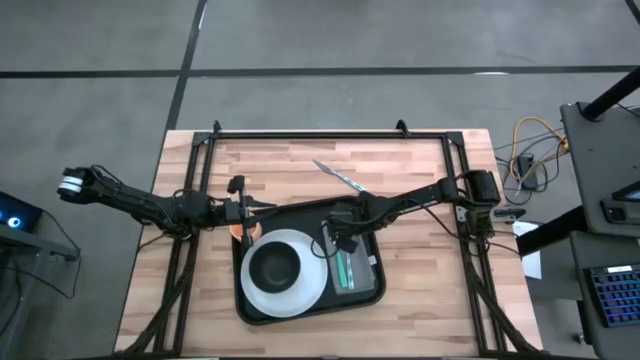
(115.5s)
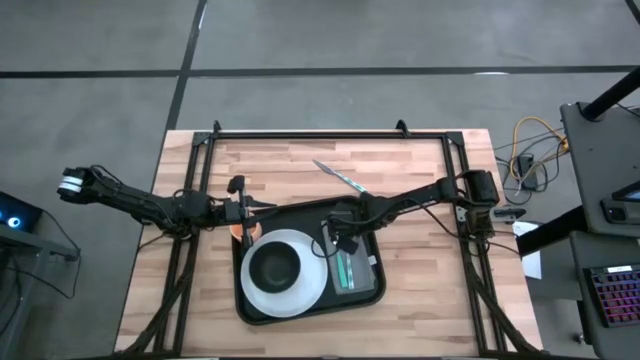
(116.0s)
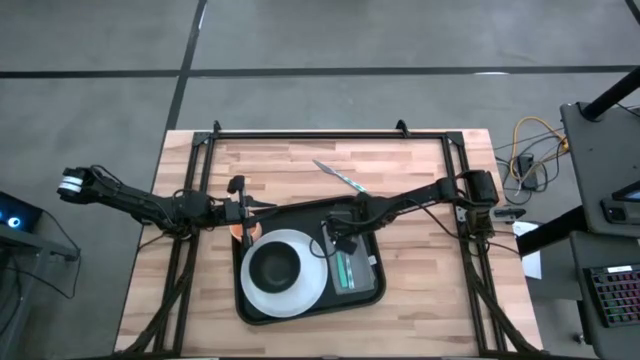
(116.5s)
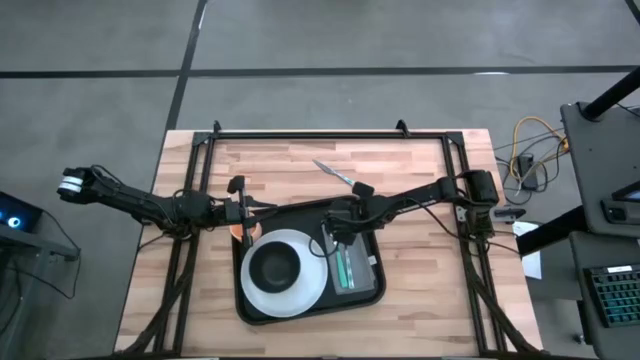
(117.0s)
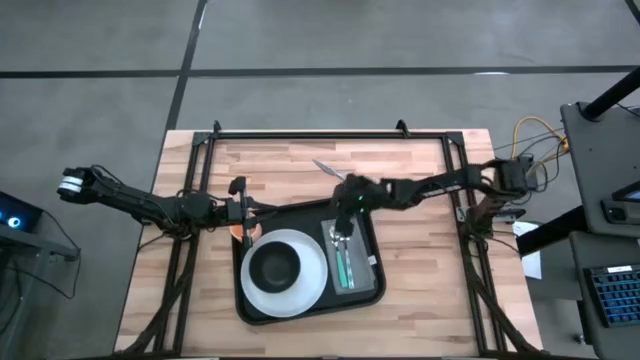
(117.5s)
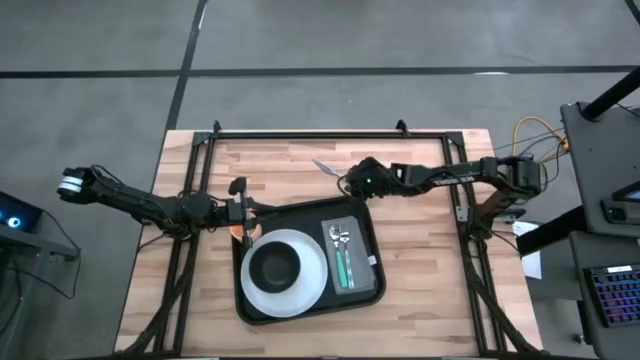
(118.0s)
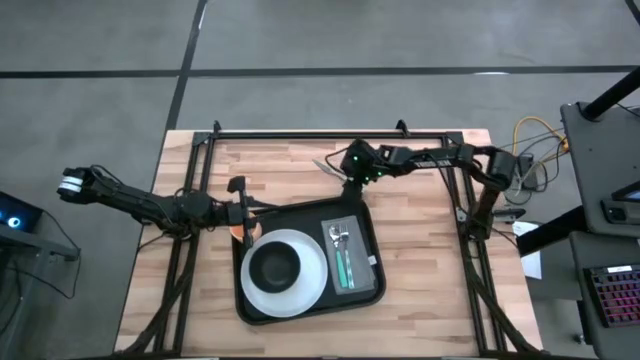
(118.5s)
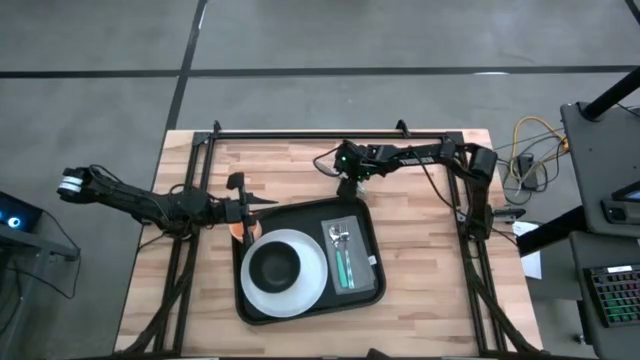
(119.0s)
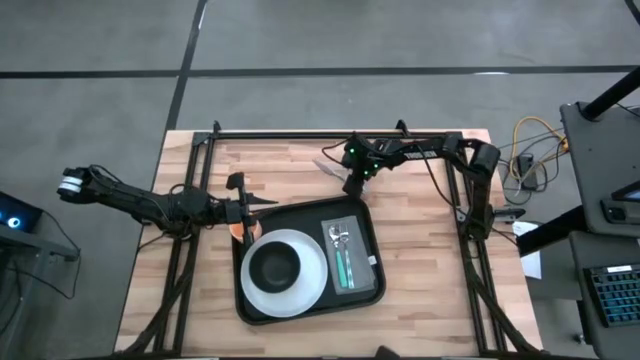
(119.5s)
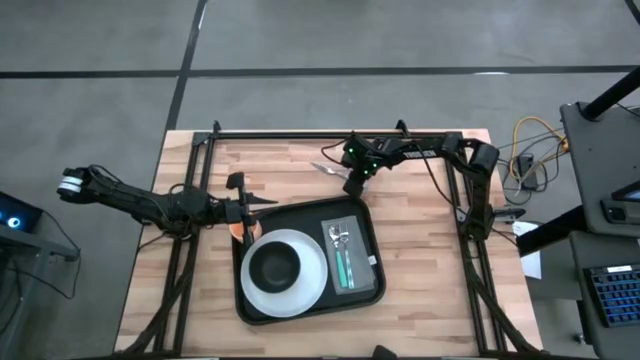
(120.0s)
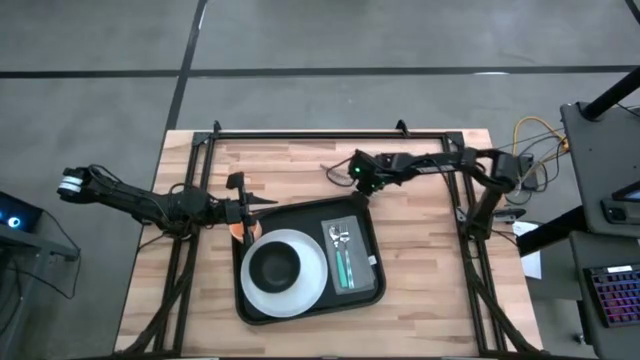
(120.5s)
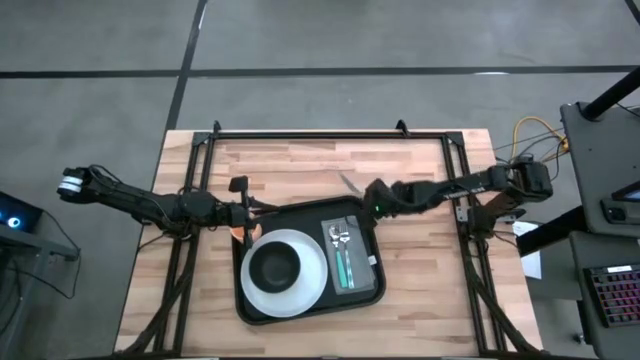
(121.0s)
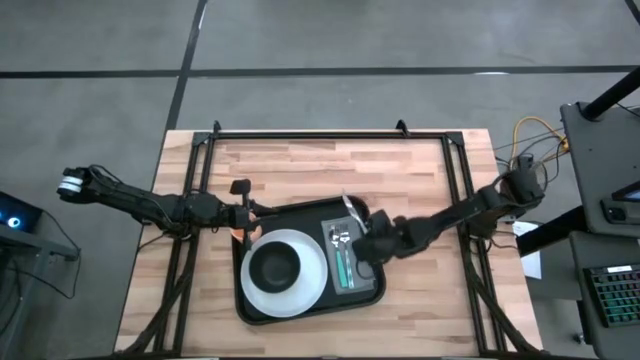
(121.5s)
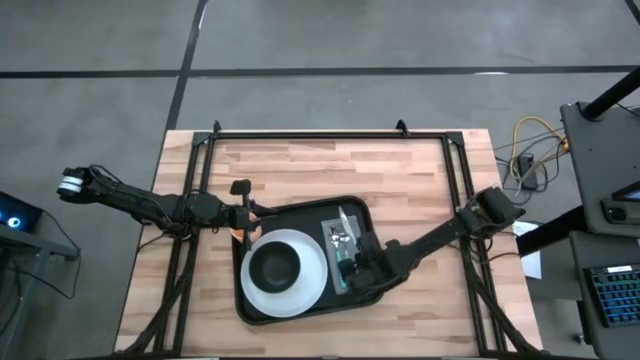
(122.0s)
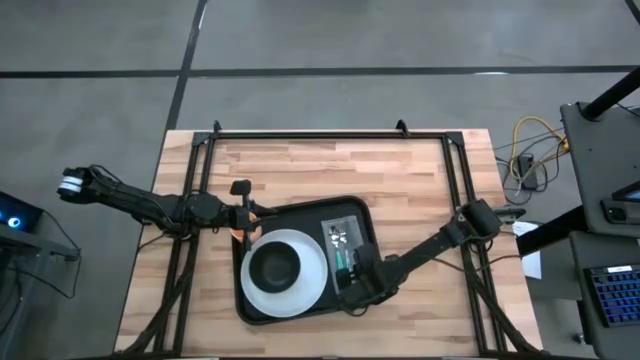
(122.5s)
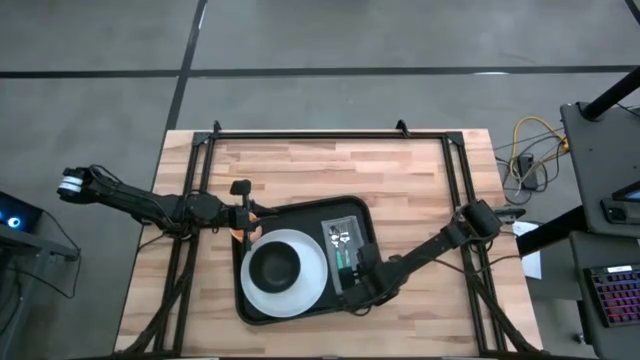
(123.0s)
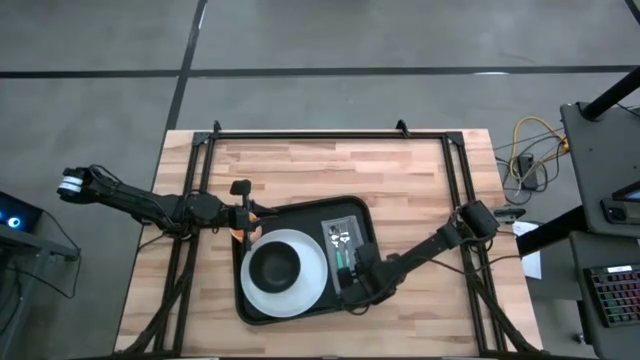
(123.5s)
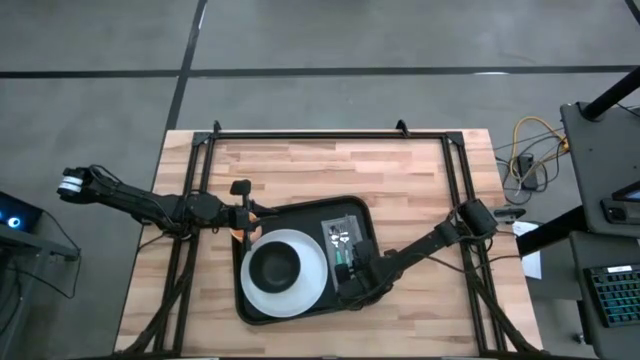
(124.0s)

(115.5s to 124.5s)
Task: Set up tray
Put the blue and white table knife on the gray napkin to the right side of the blue and white fork

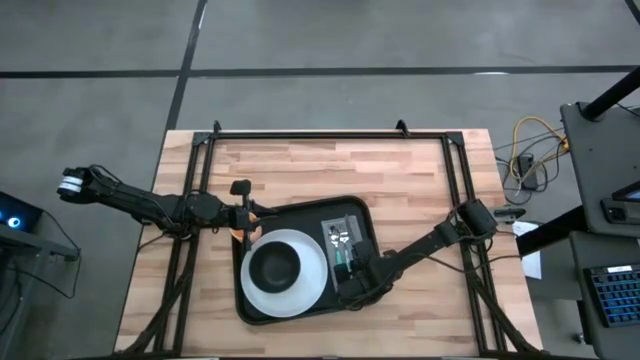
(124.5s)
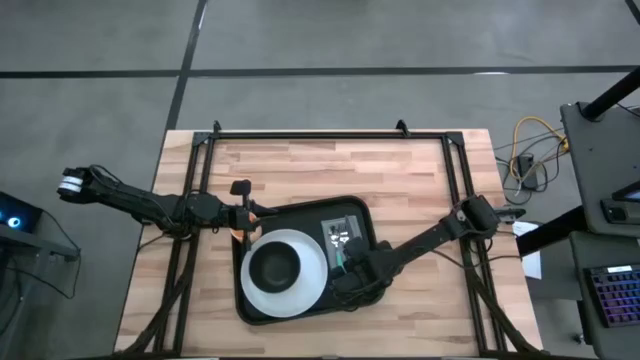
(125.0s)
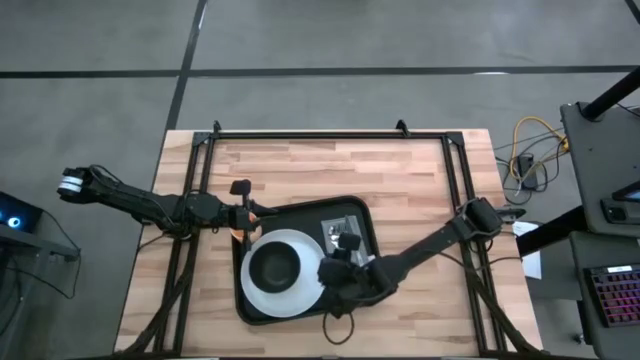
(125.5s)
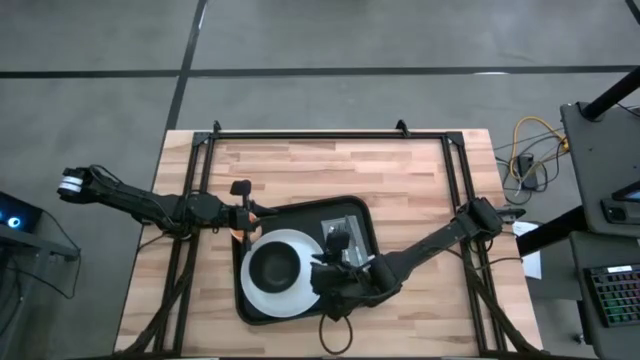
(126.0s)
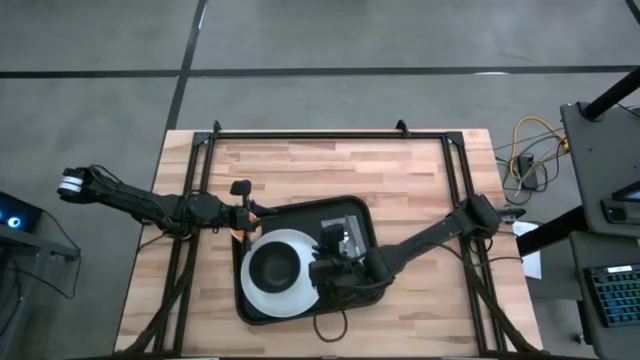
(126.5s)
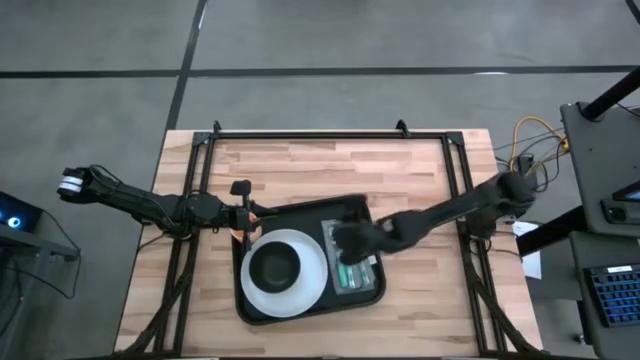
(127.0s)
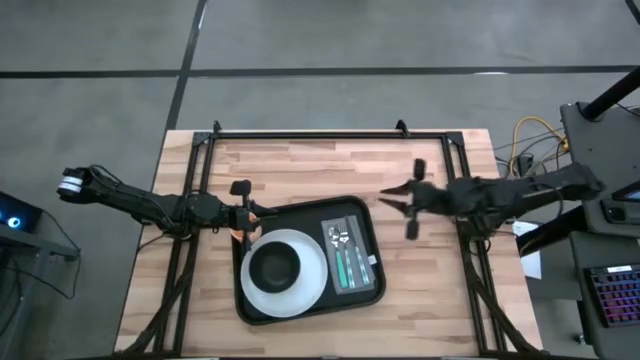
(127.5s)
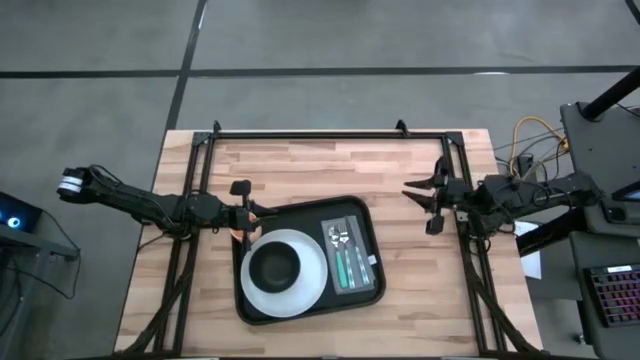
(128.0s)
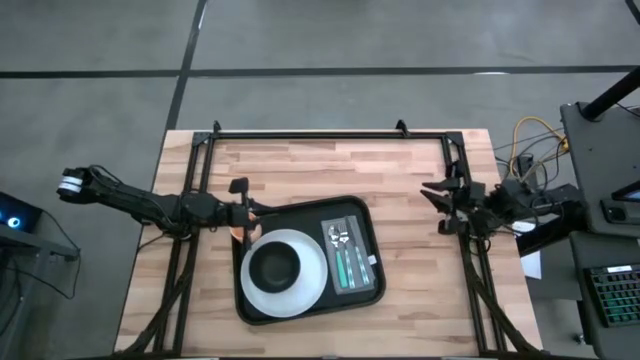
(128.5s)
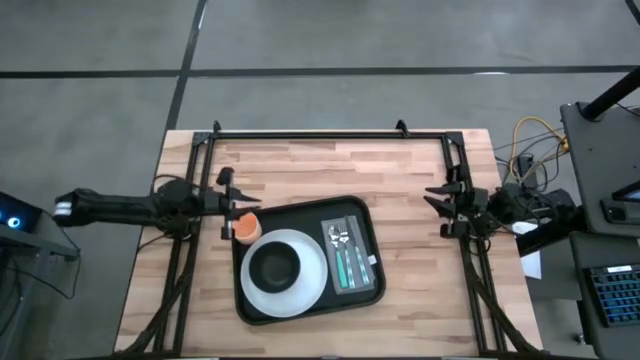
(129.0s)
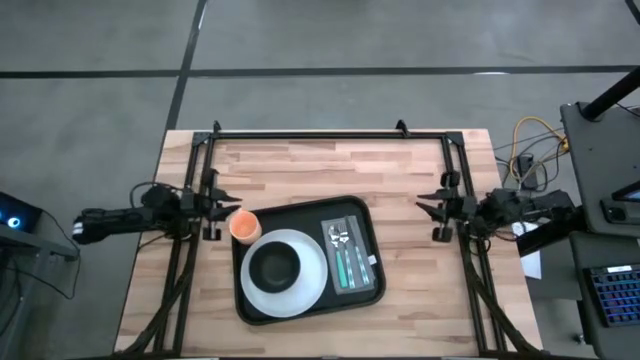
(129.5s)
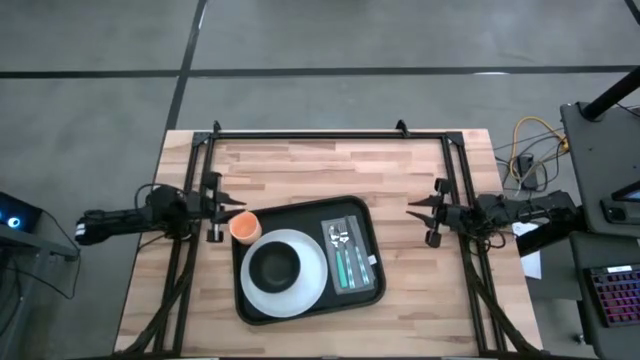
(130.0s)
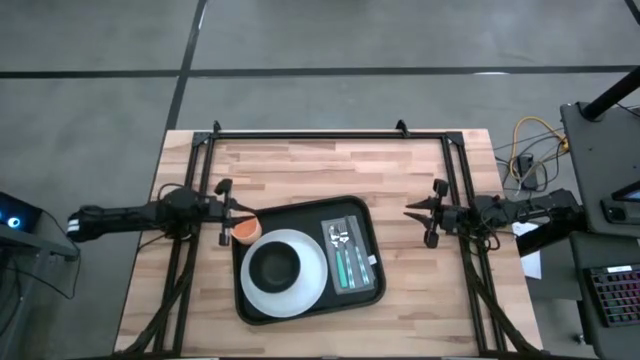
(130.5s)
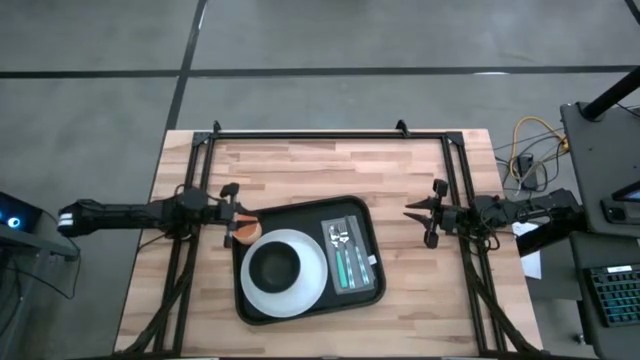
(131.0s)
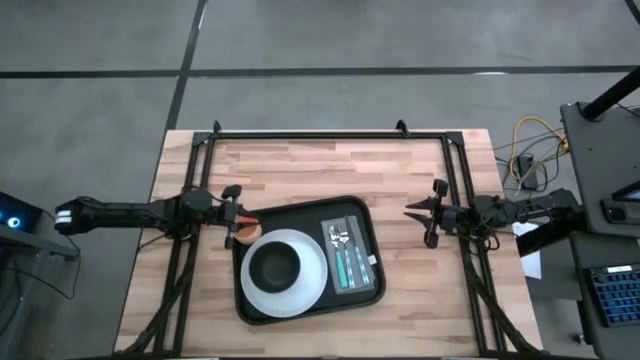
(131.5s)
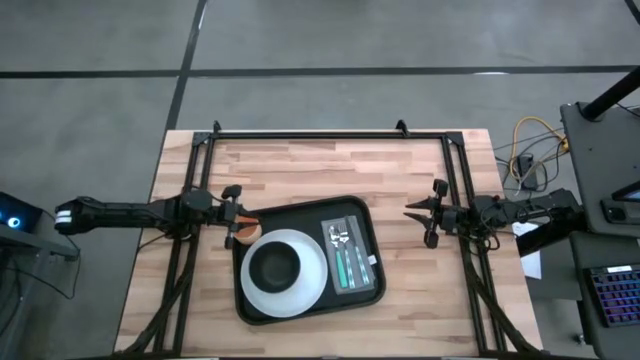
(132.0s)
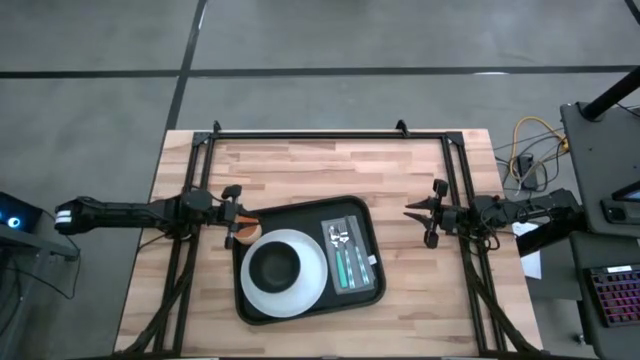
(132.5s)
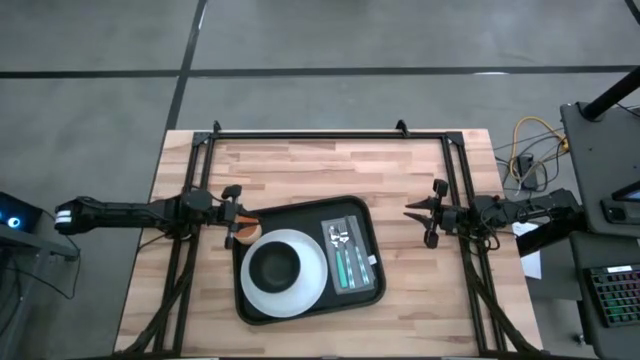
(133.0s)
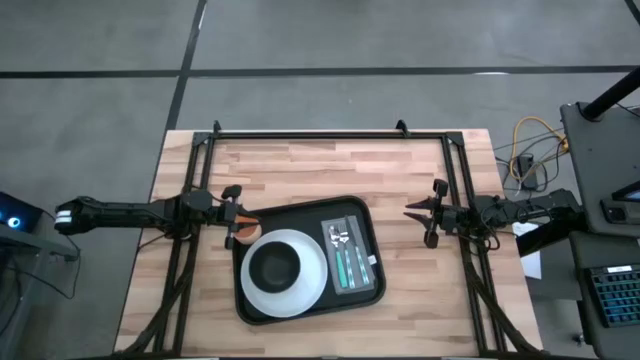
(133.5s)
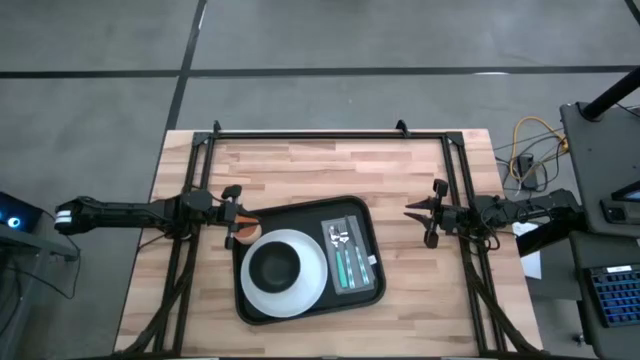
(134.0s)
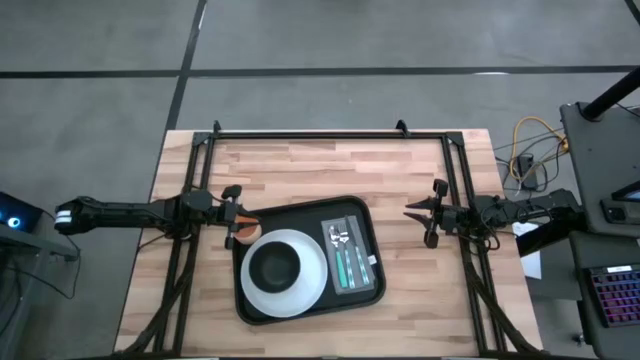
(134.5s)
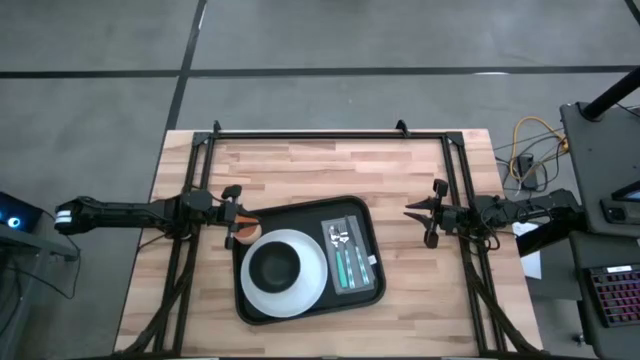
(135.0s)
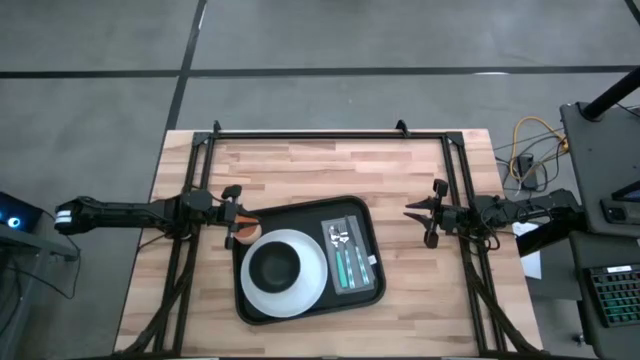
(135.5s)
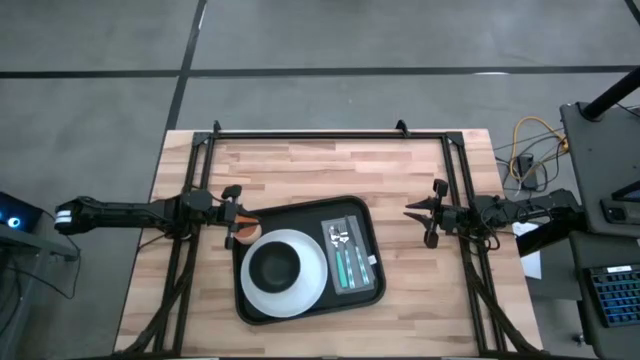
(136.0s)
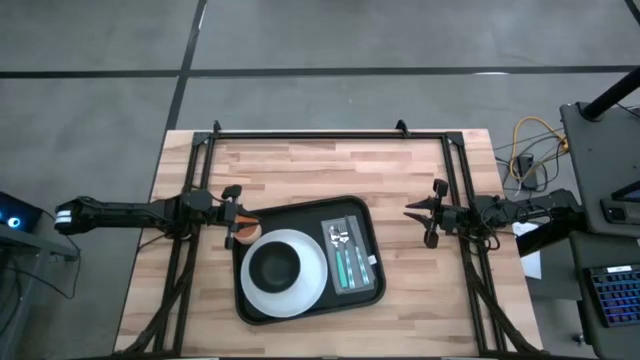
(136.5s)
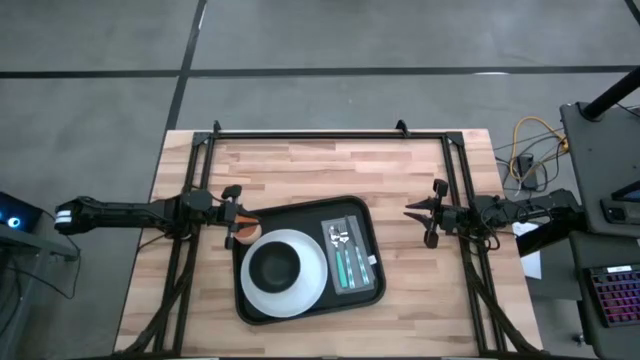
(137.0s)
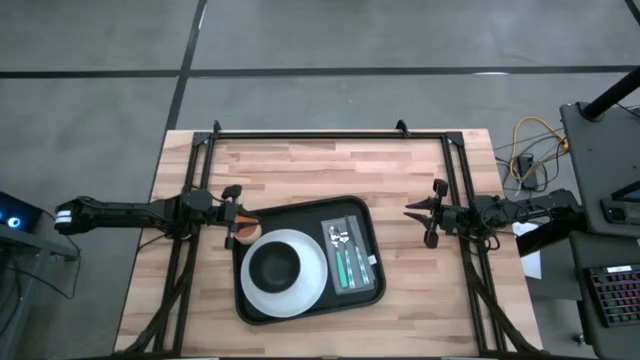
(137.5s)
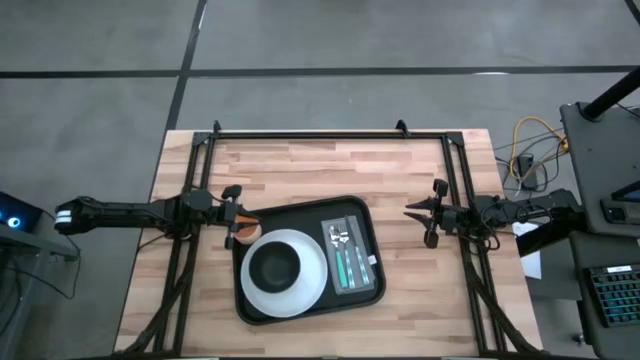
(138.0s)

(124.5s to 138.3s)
Return to Home Position
